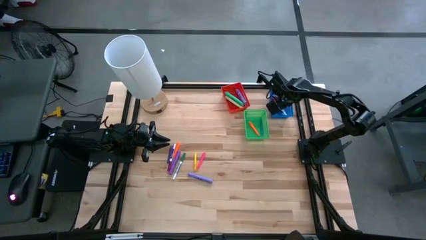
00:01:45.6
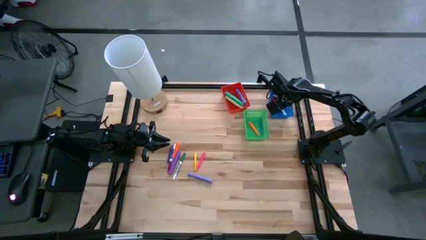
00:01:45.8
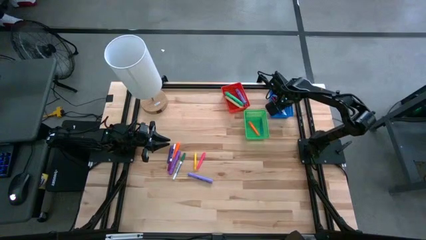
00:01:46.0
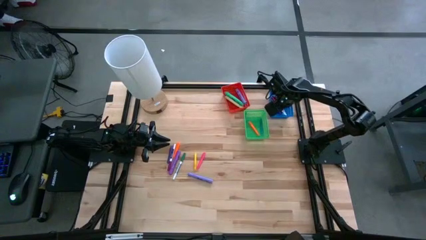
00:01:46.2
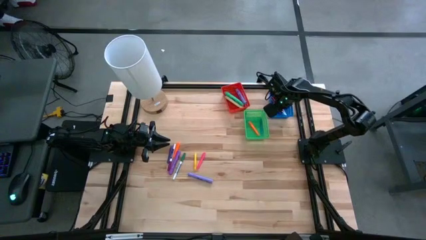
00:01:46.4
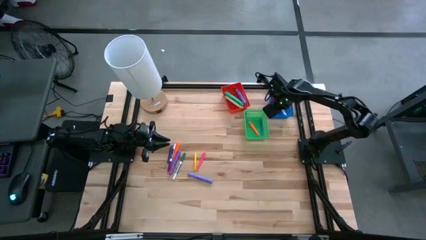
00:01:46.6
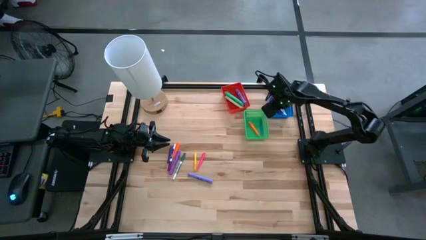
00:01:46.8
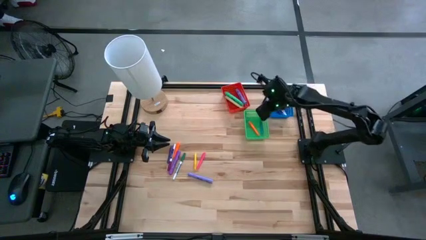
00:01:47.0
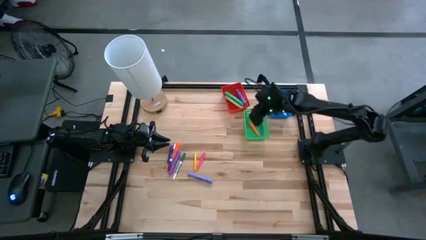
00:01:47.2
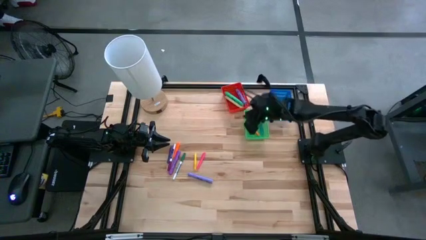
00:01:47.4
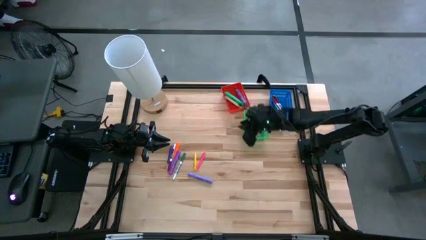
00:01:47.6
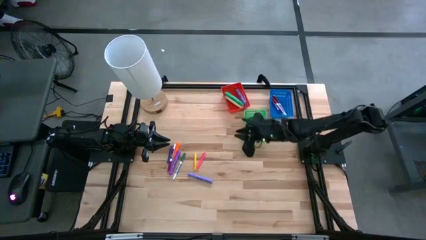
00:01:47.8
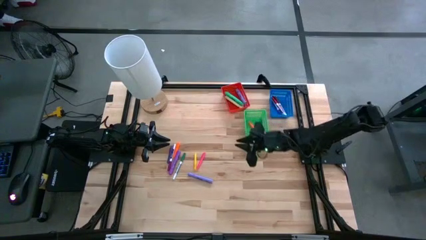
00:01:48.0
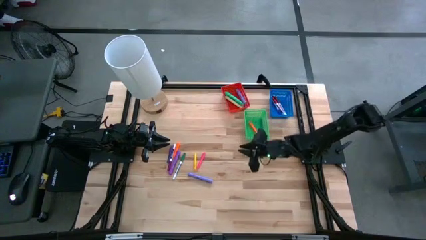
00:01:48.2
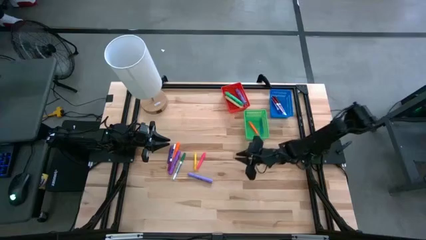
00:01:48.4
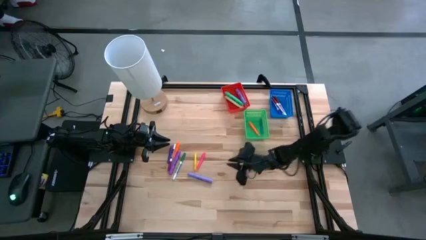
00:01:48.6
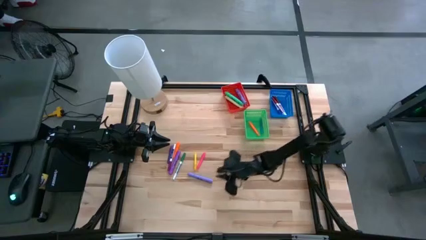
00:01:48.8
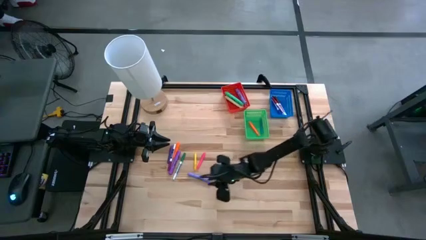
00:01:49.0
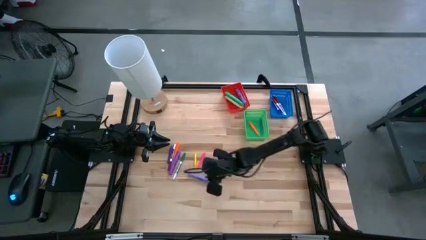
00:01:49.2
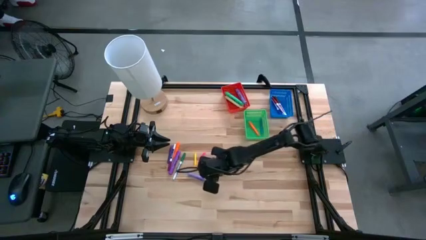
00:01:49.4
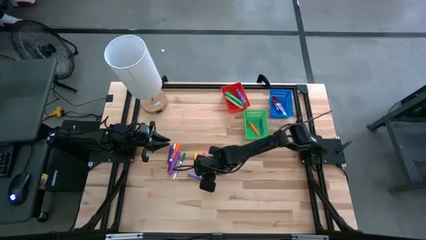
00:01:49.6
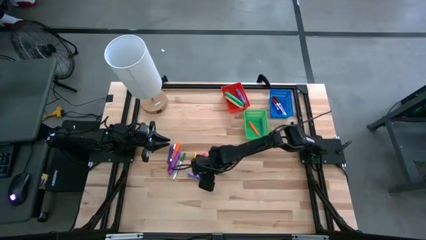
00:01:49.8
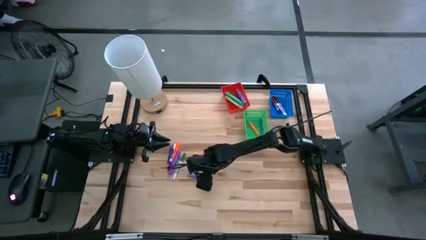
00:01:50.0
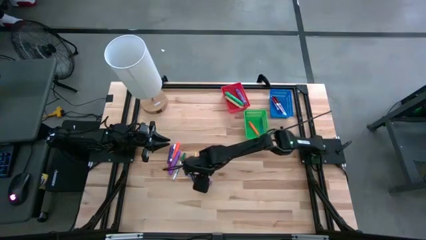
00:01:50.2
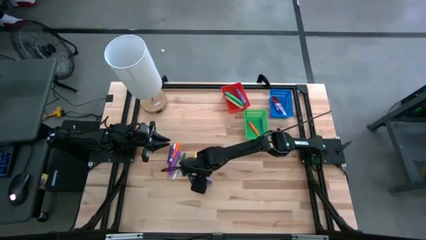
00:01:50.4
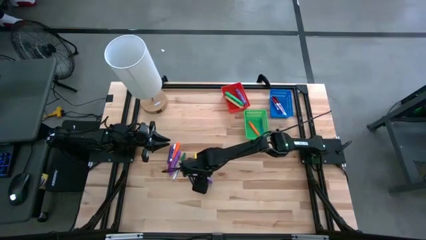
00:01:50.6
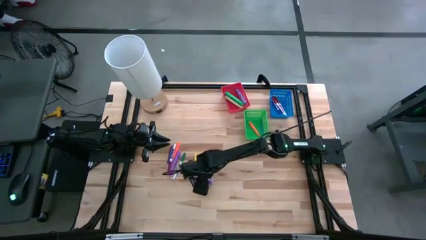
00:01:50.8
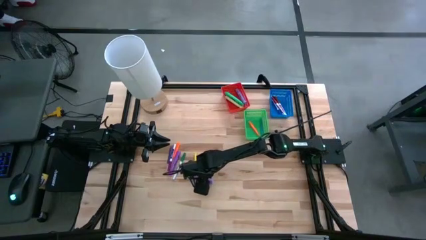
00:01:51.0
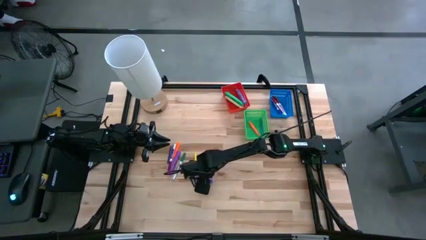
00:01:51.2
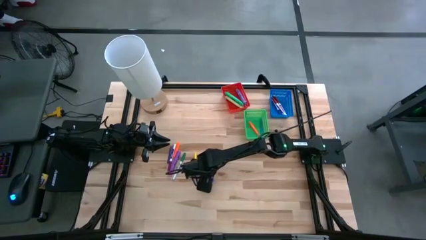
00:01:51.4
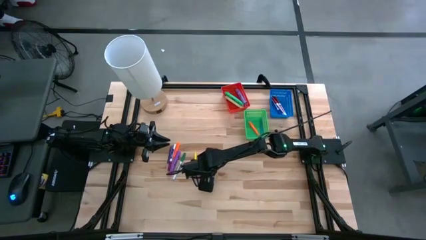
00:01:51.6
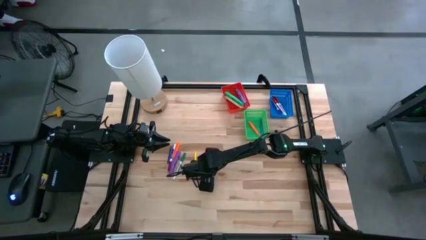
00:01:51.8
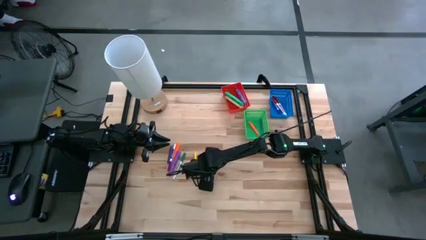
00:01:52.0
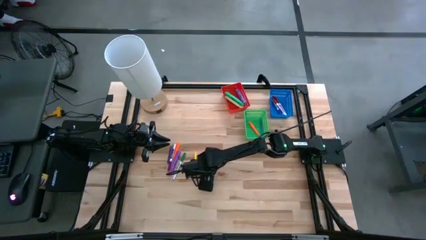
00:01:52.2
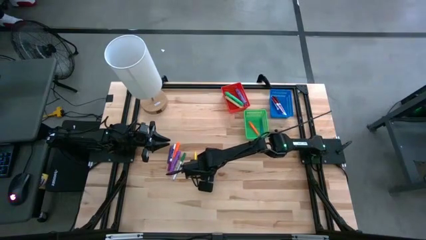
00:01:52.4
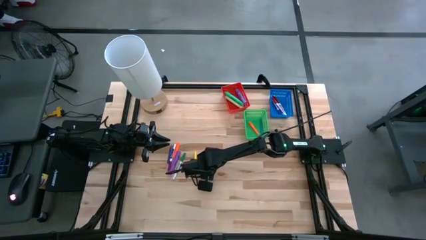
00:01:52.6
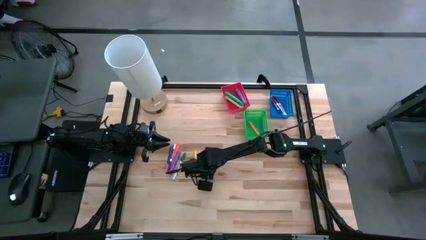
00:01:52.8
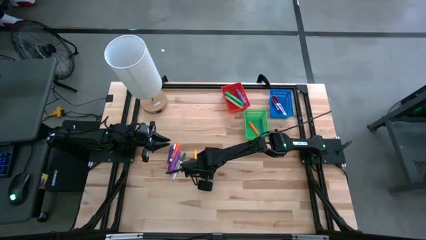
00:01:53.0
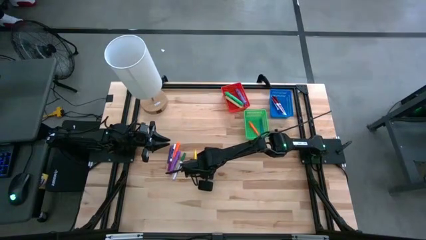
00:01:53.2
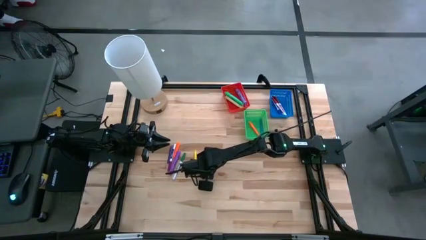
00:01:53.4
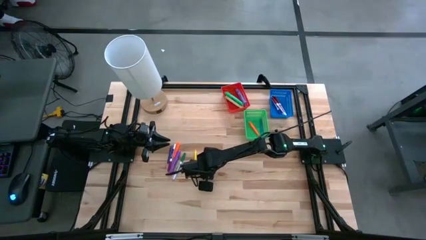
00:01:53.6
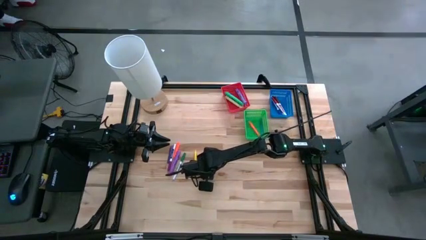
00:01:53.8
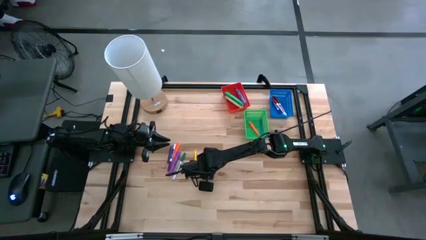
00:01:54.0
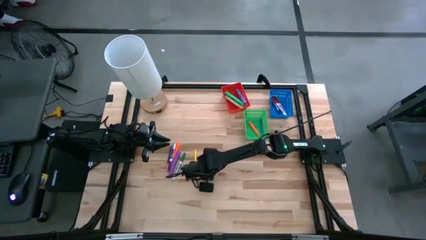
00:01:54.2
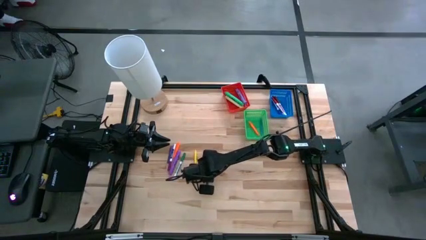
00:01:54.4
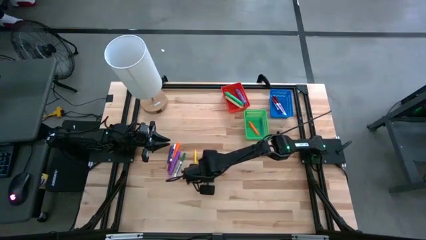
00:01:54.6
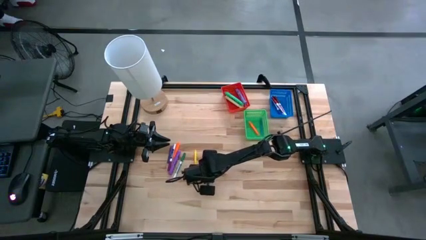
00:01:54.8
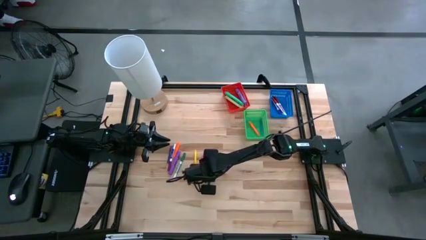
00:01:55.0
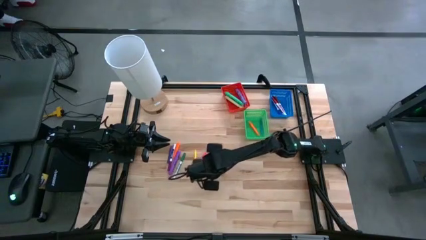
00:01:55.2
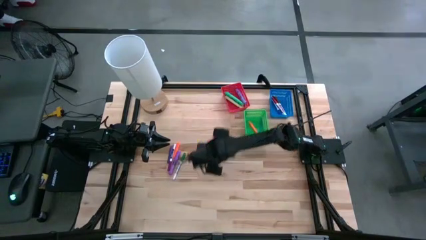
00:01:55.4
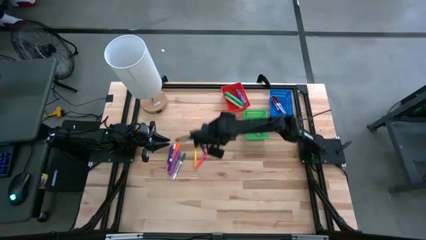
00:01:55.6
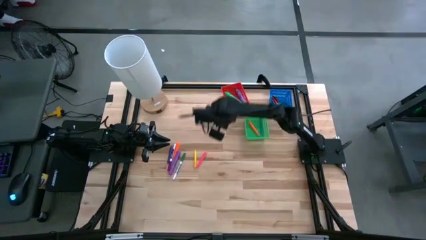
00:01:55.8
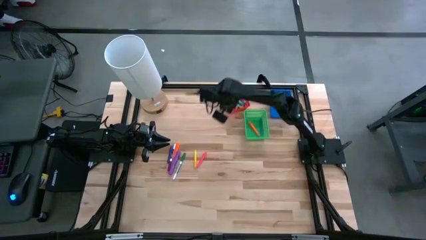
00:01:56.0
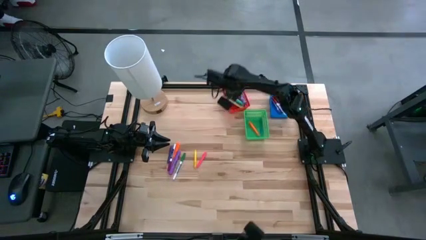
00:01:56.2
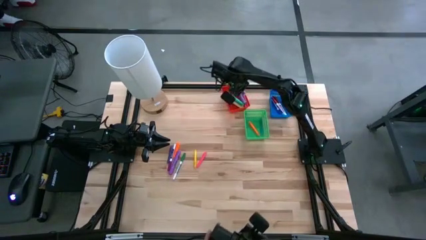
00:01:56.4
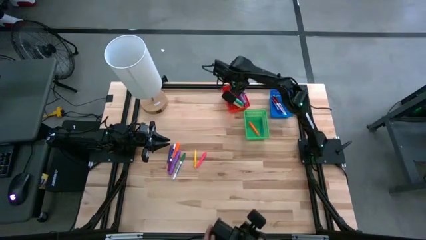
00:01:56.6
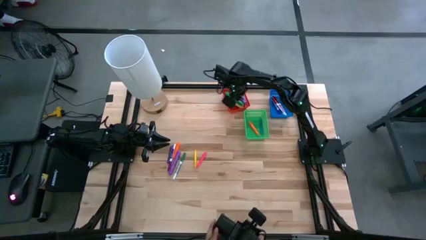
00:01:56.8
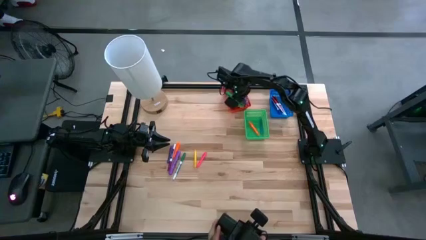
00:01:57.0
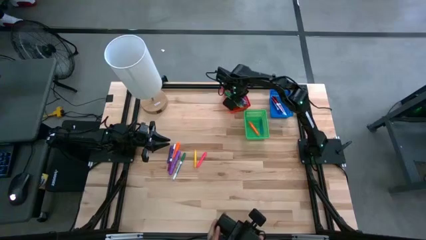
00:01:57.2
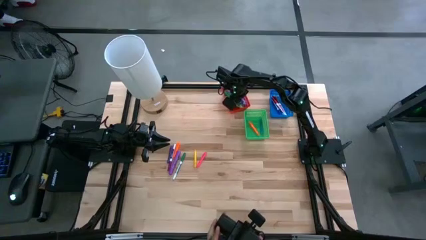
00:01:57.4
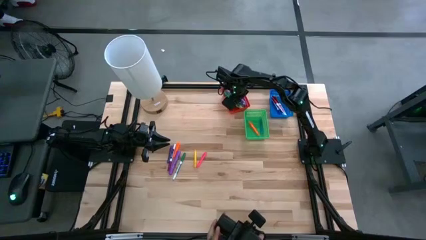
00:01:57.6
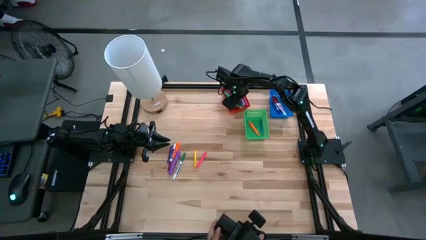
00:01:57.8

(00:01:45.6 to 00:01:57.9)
Task: Pick & Place Markers
Put the right purple highlighter in the red bin
